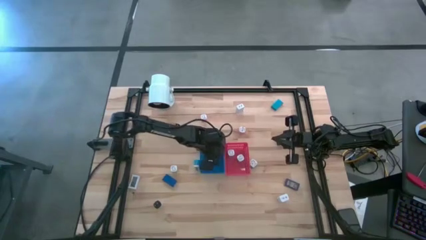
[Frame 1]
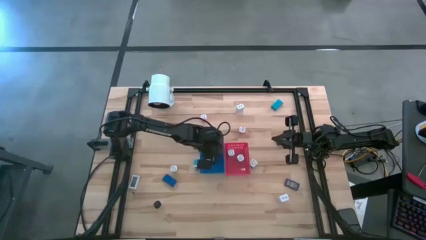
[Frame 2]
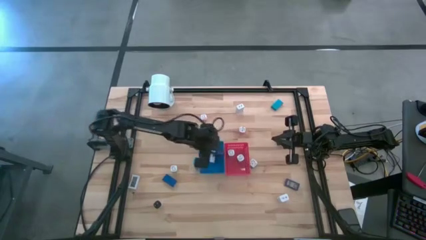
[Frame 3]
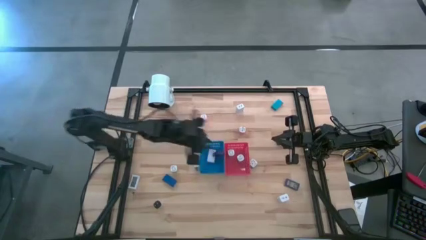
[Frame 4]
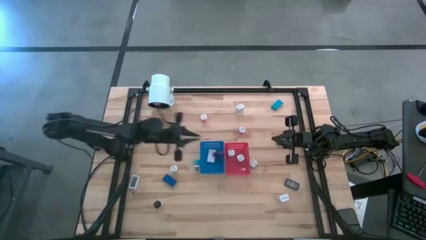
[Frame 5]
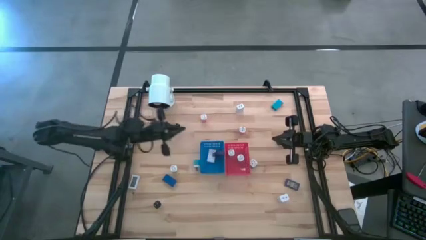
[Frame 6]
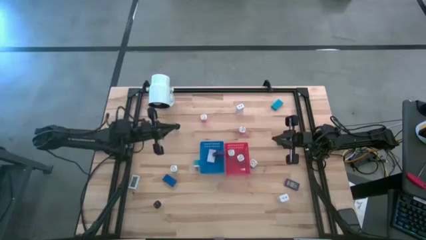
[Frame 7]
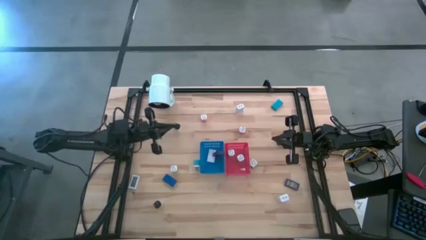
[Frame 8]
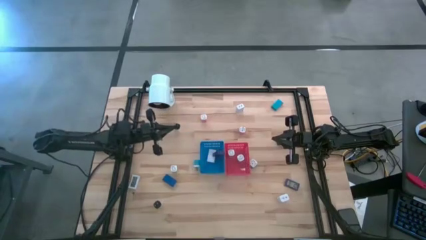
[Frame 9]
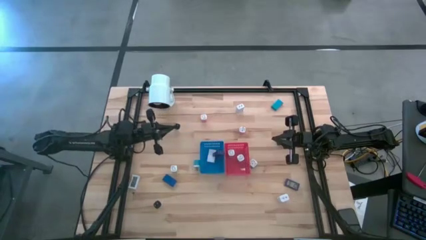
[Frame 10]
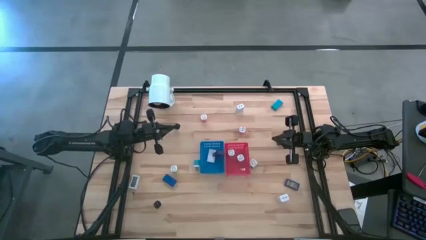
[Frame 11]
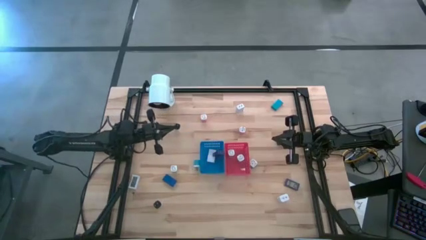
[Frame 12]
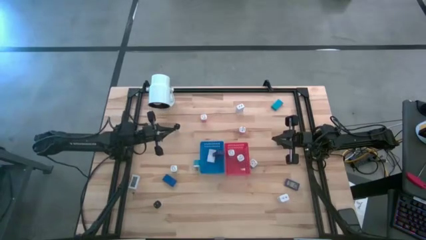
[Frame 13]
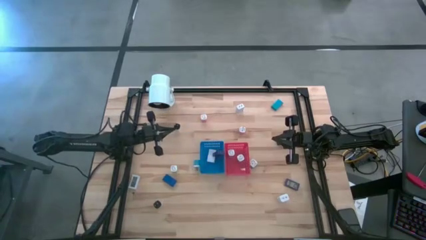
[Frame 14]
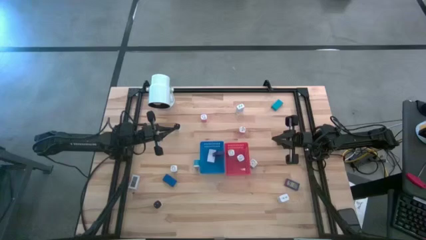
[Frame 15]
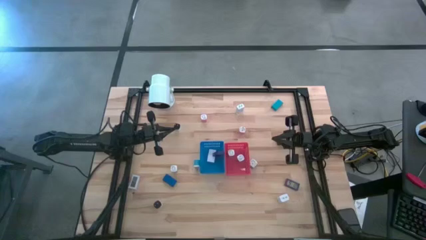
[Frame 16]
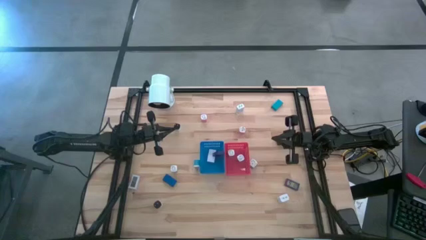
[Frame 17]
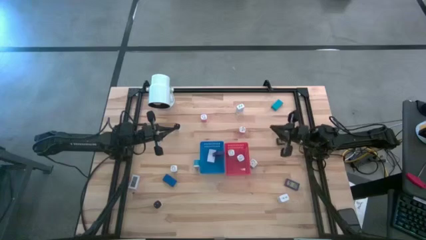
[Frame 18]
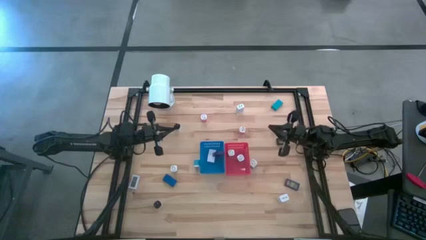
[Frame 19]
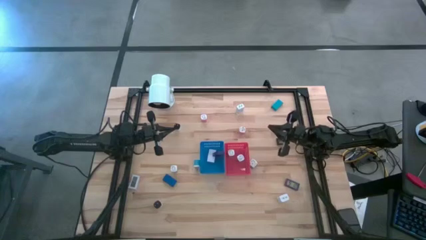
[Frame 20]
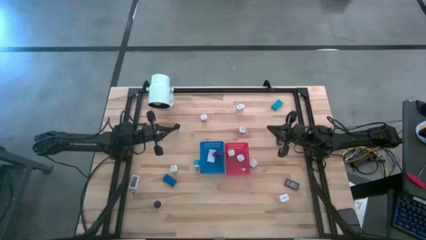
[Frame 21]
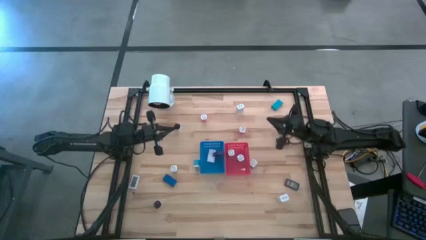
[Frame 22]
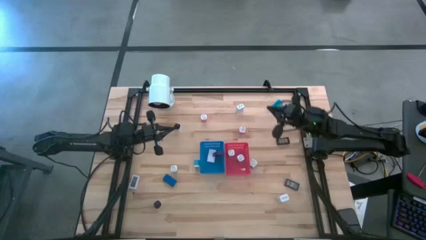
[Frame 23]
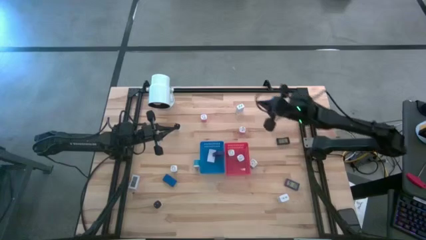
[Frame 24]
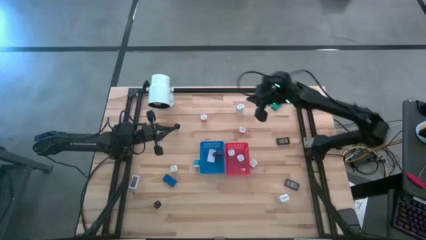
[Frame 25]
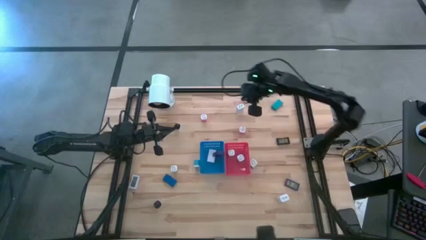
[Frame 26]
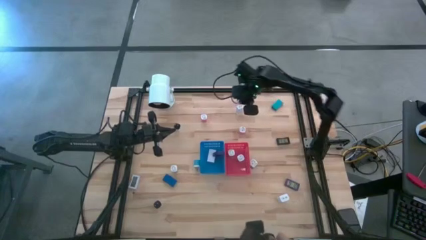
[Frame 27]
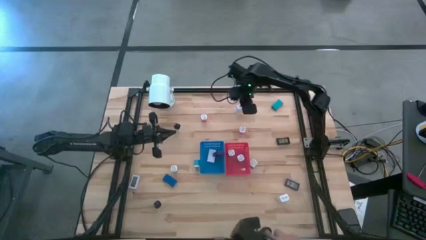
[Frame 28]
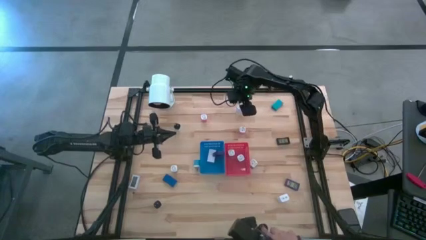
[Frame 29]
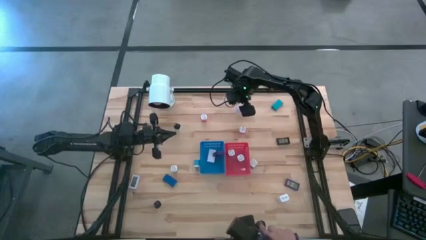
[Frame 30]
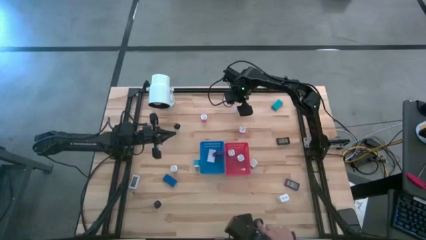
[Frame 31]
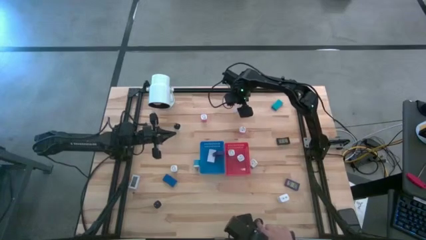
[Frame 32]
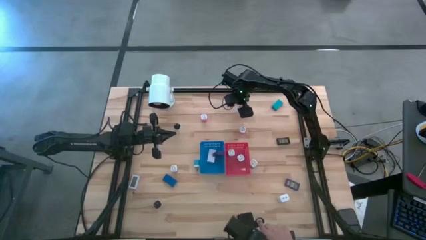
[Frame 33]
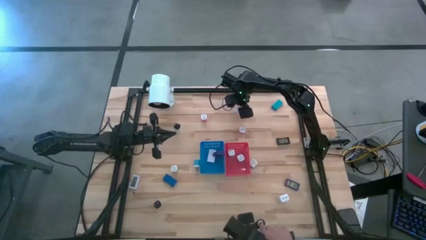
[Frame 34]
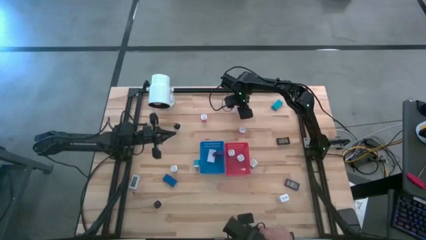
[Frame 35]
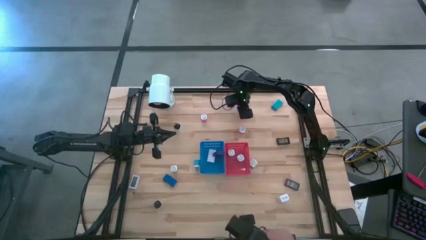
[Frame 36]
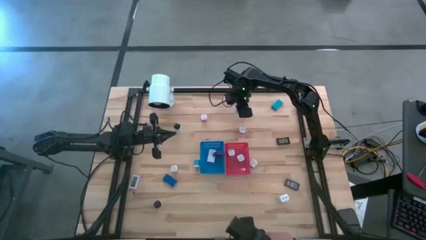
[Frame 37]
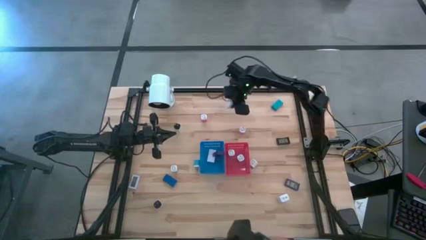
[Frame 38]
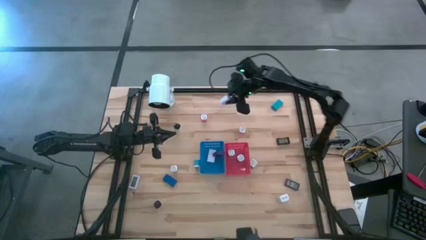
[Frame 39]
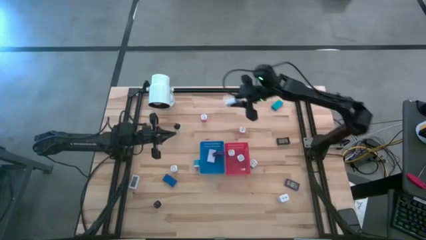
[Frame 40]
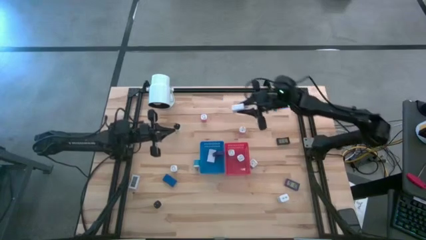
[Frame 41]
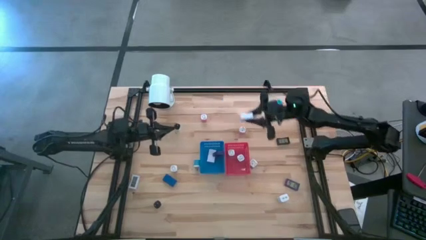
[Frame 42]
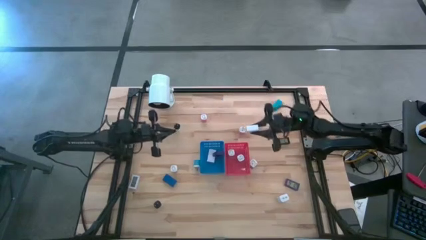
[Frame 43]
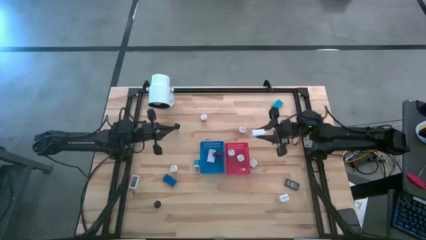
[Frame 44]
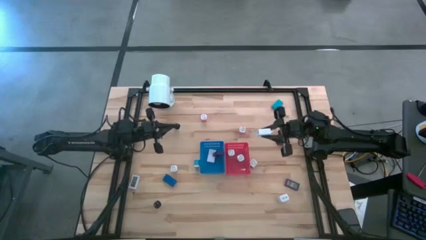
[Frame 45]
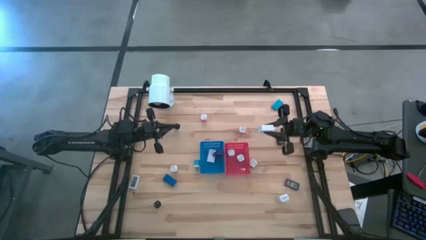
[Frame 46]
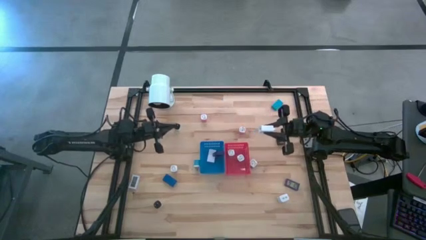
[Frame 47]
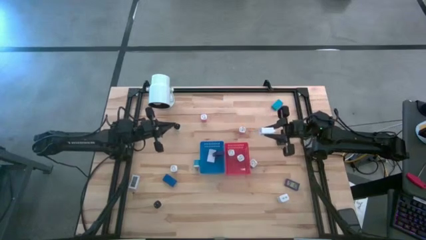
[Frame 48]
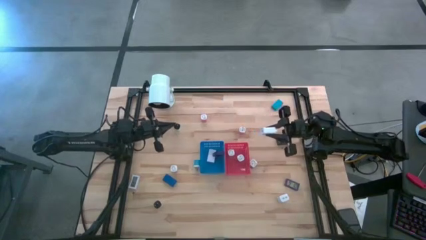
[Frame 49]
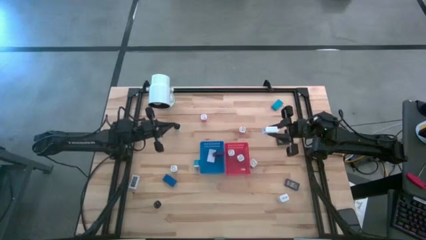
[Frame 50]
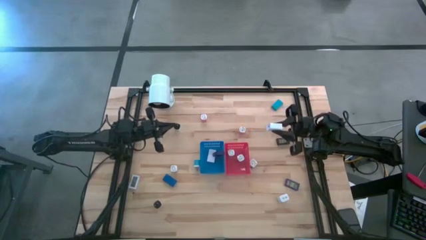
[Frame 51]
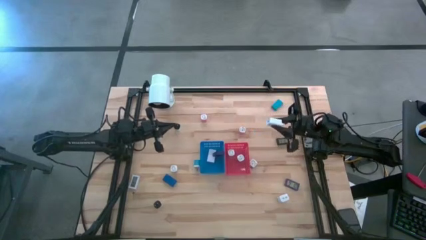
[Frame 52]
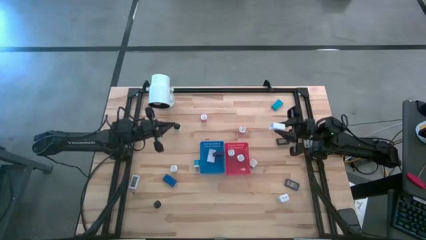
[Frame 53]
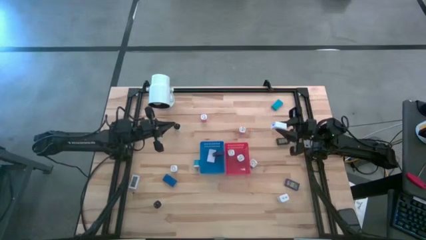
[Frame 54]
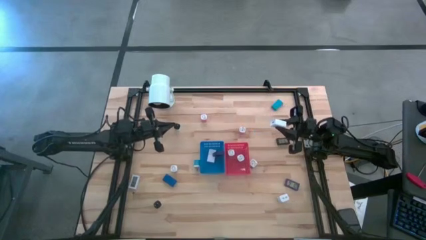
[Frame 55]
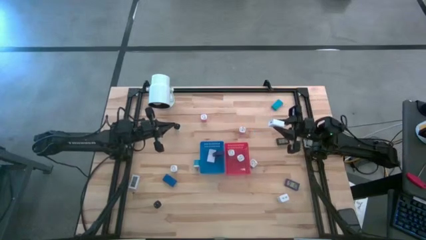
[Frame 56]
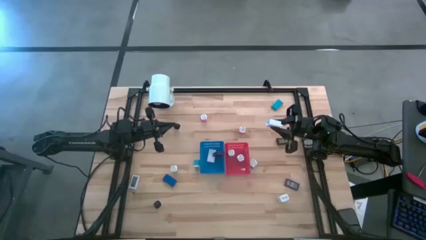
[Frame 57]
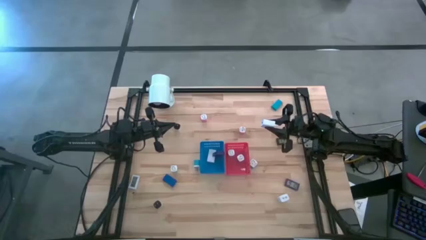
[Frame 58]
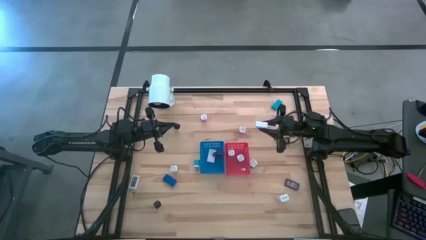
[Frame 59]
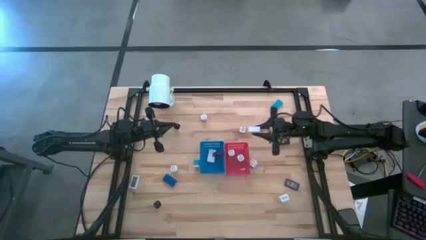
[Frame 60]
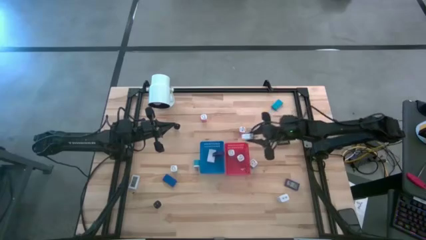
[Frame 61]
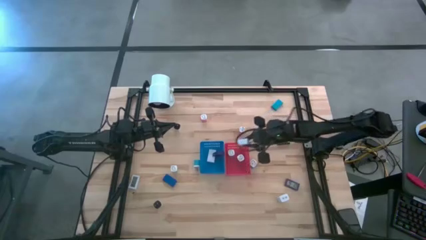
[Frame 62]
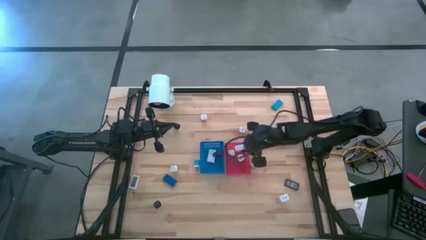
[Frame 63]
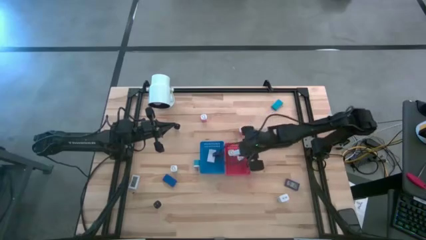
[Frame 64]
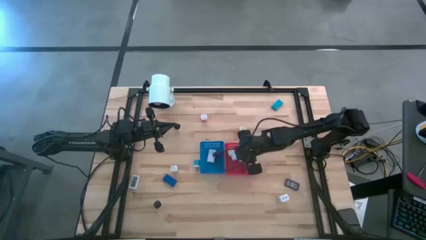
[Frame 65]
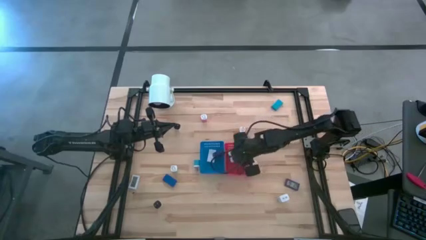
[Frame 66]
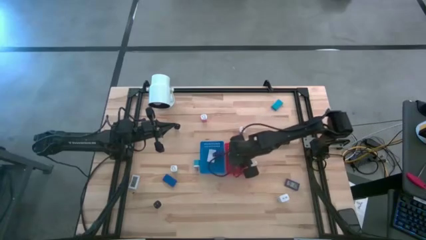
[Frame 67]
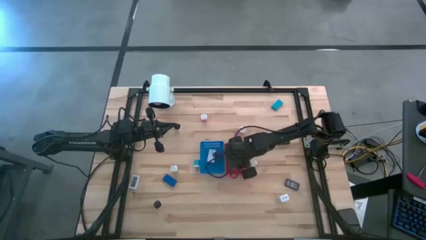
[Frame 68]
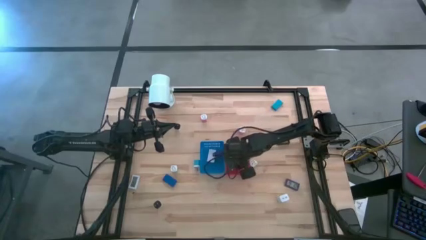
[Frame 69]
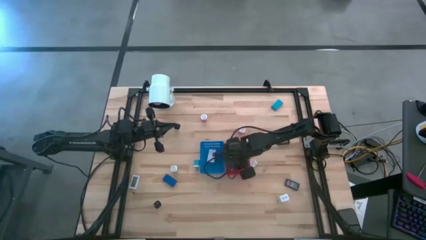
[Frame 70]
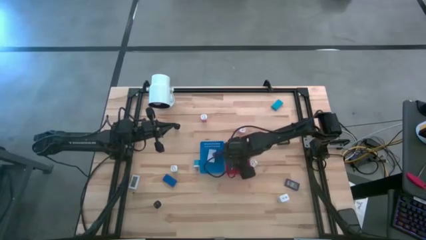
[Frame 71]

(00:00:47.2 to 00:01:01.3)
Task: Sort adapters and digital timers
Put the top white charger adaptor into the red bin

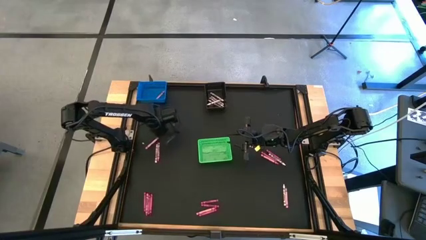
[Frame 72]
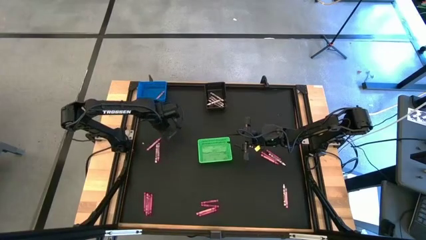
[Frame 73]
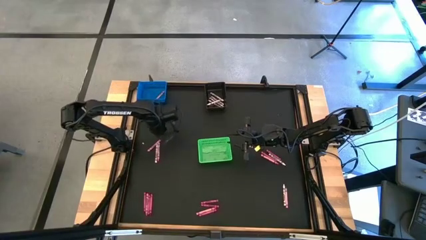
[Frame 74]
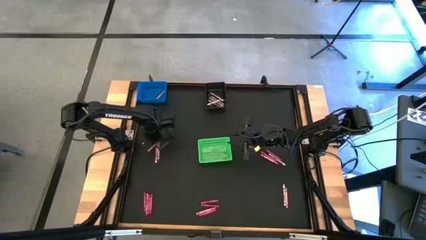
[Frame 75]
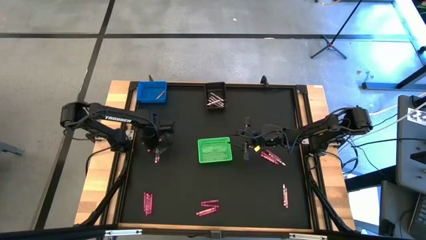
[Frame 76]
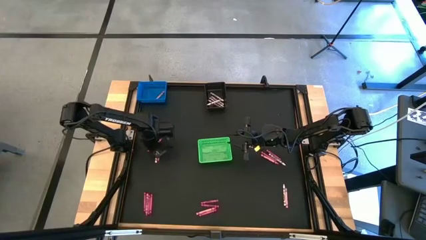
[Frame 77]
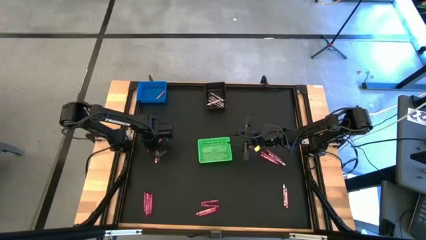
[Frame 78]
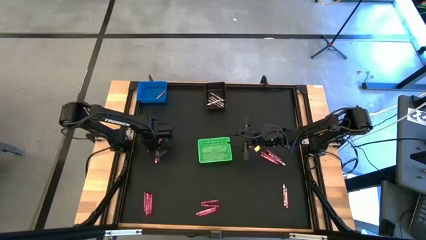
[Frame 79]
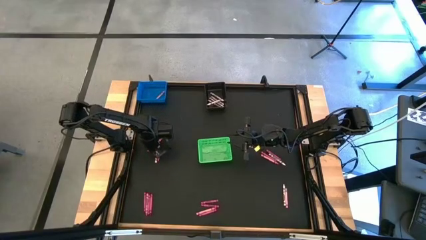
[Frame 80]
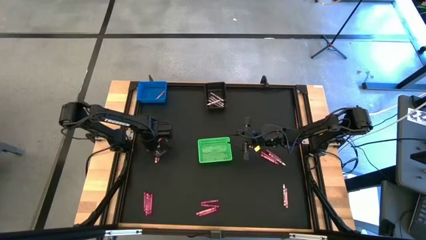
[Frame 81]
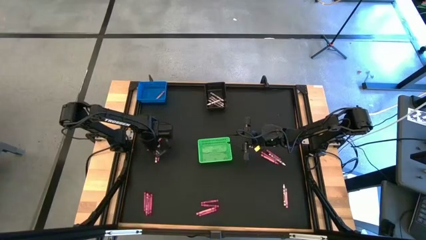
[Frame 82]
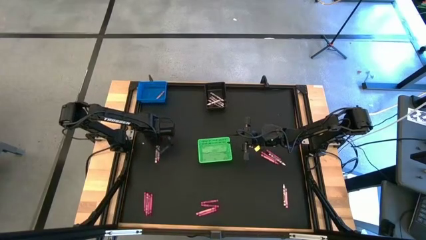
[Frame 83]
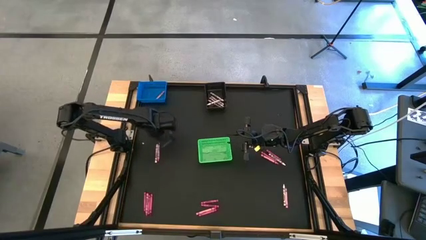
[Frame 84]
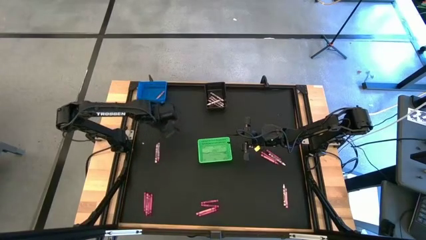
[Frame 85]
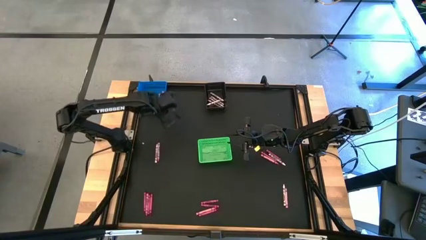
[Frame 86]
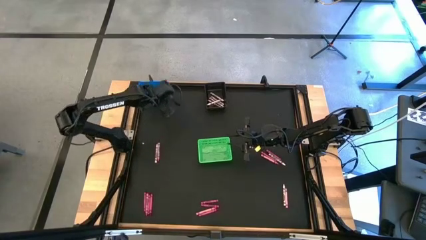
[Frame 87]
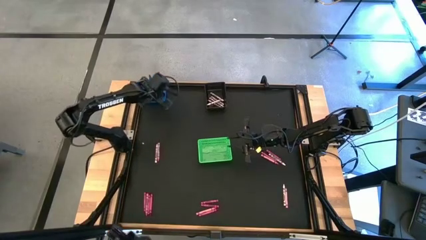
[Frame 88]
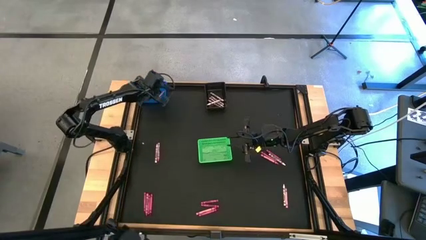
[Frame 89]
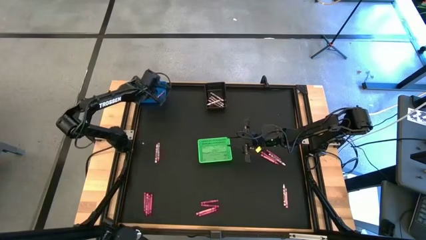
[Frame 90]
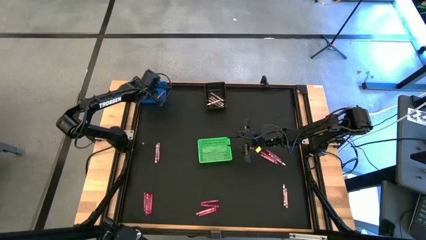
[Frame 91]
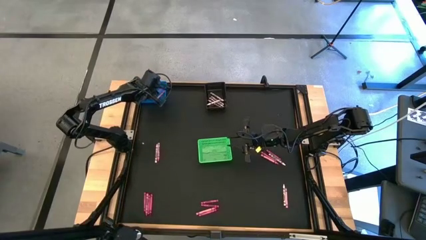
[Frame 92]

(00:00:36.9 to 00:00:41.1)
Task: Sort crayons
Put the pink crayon into the blue bin
